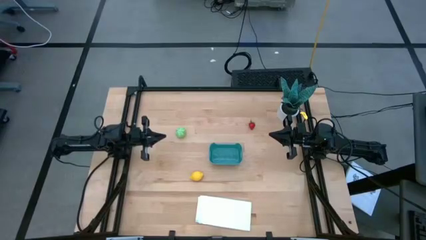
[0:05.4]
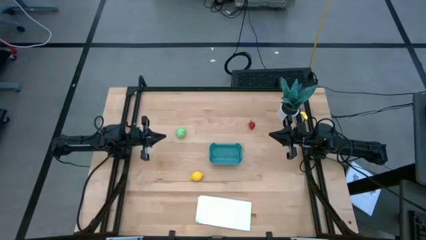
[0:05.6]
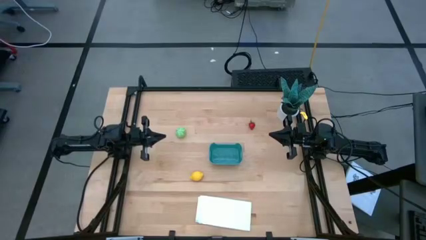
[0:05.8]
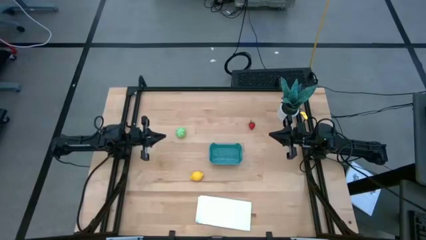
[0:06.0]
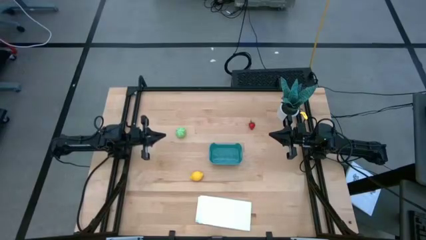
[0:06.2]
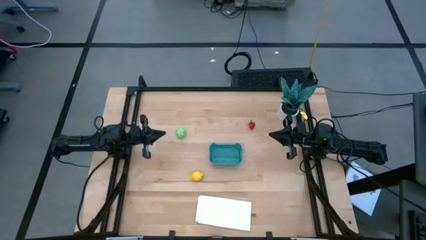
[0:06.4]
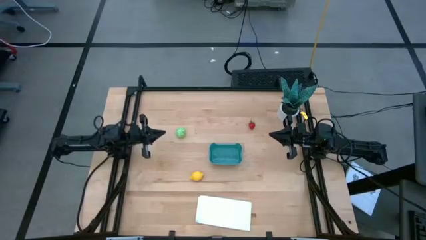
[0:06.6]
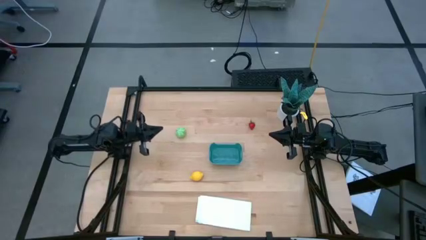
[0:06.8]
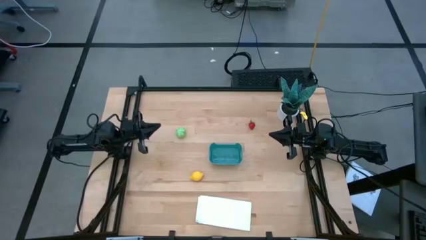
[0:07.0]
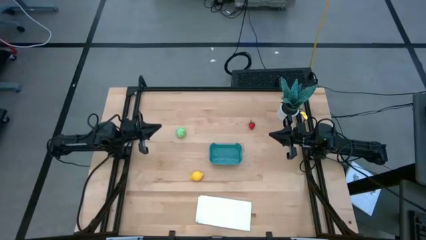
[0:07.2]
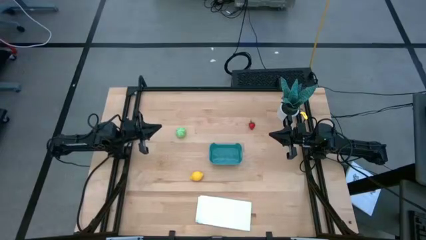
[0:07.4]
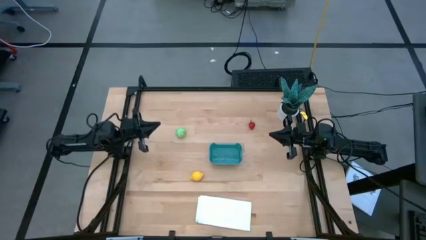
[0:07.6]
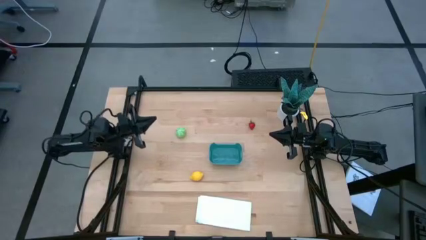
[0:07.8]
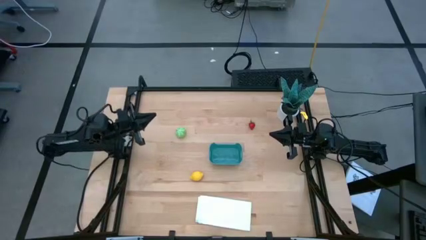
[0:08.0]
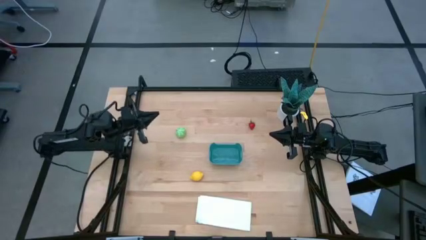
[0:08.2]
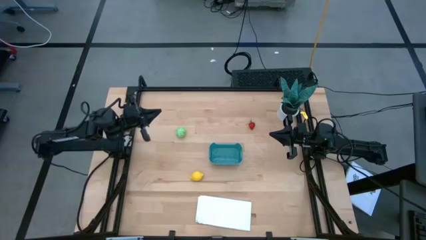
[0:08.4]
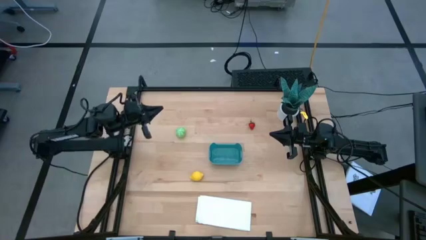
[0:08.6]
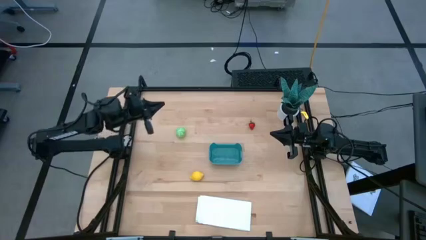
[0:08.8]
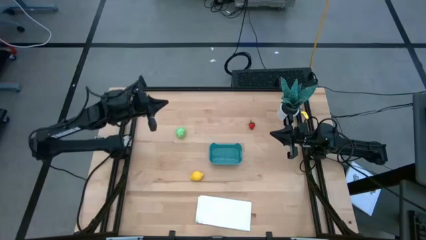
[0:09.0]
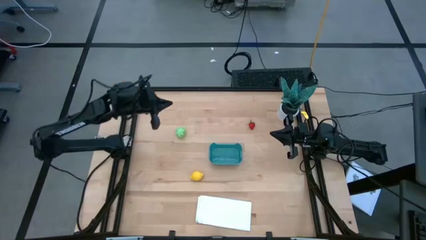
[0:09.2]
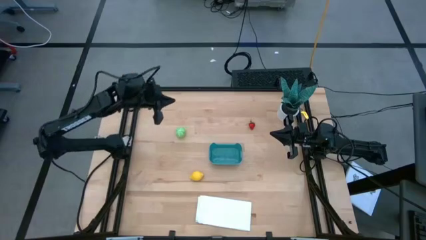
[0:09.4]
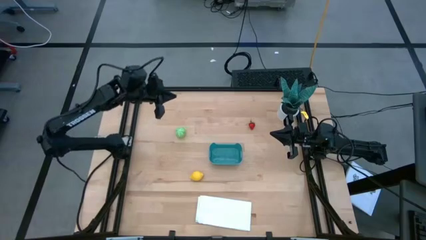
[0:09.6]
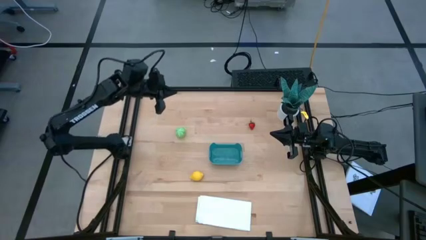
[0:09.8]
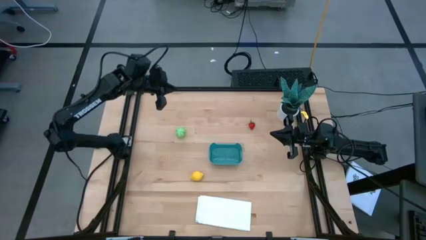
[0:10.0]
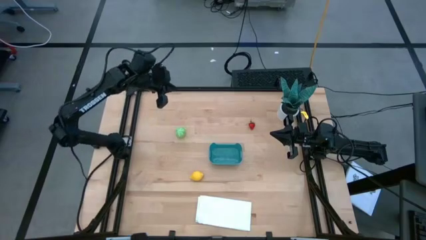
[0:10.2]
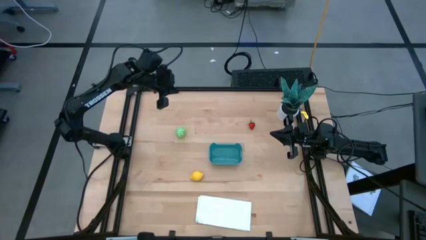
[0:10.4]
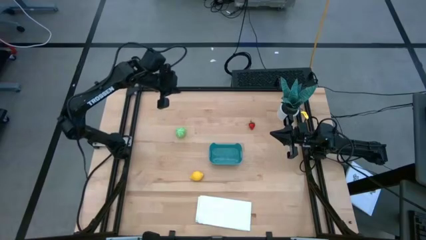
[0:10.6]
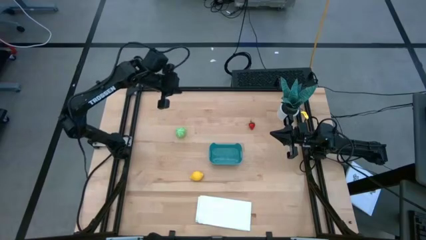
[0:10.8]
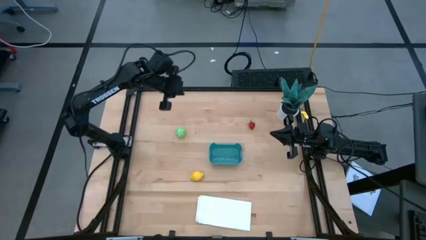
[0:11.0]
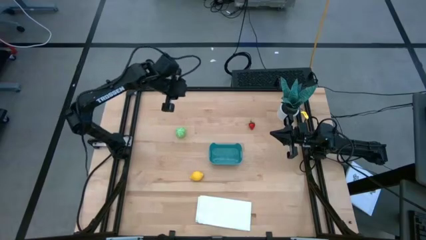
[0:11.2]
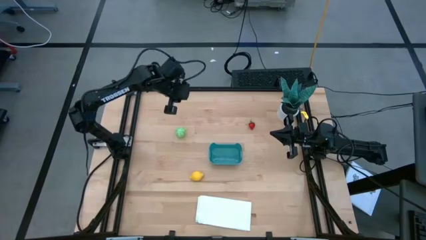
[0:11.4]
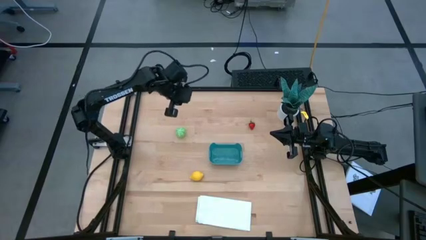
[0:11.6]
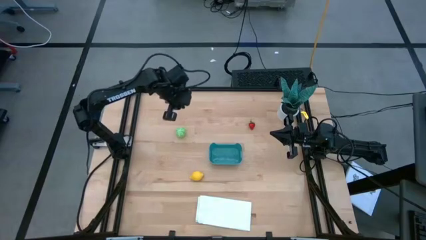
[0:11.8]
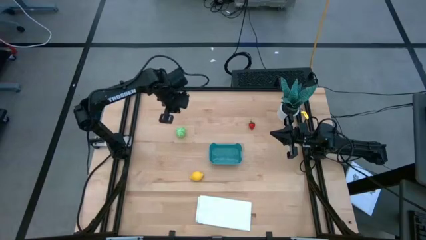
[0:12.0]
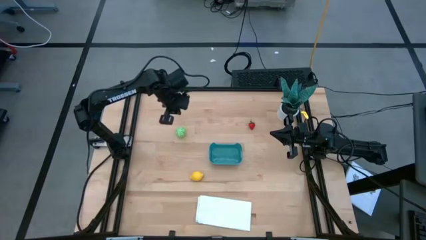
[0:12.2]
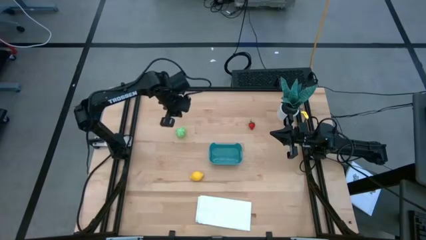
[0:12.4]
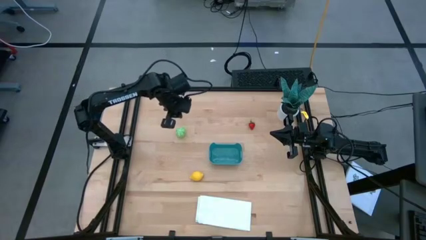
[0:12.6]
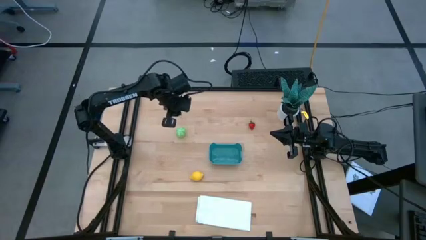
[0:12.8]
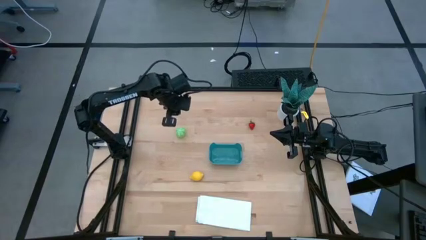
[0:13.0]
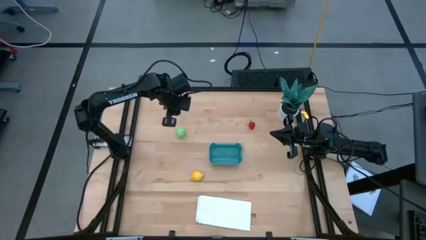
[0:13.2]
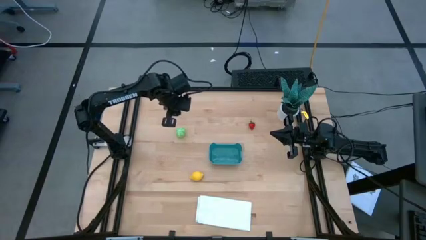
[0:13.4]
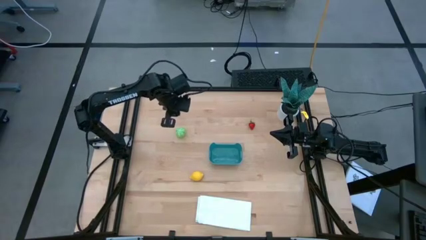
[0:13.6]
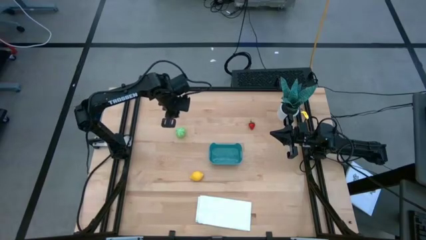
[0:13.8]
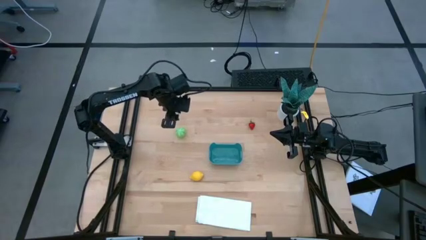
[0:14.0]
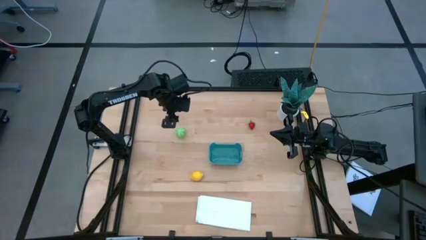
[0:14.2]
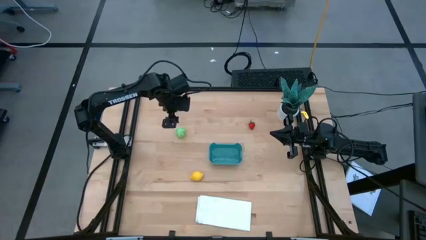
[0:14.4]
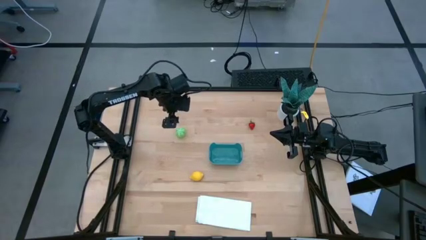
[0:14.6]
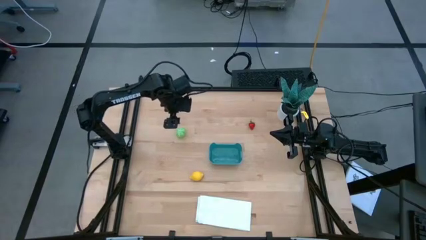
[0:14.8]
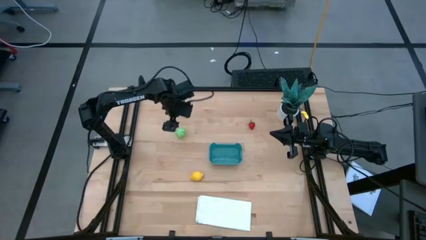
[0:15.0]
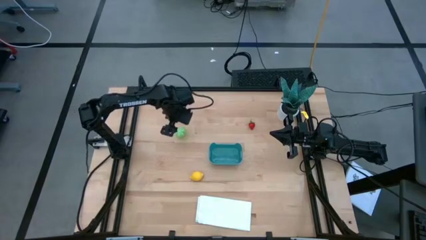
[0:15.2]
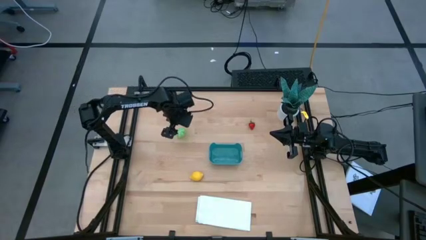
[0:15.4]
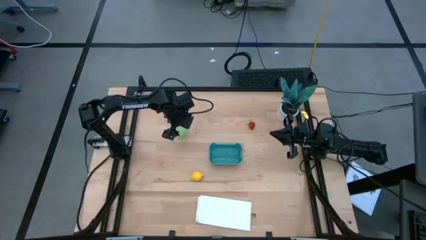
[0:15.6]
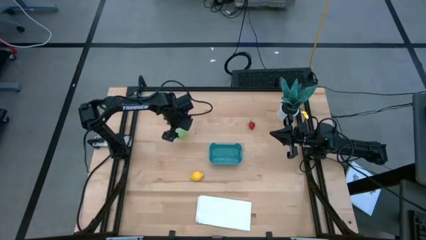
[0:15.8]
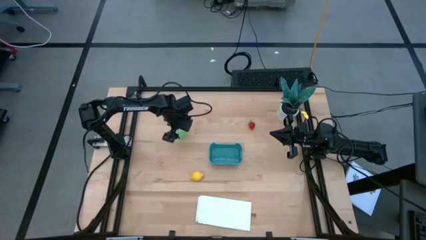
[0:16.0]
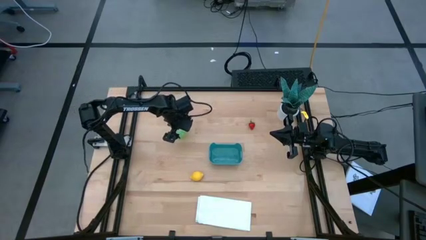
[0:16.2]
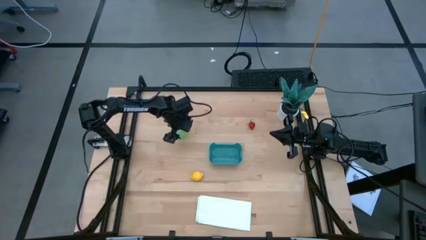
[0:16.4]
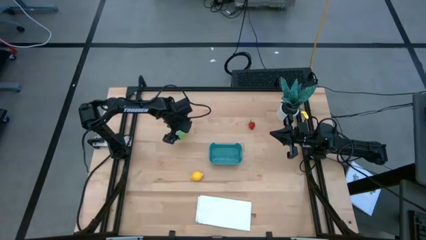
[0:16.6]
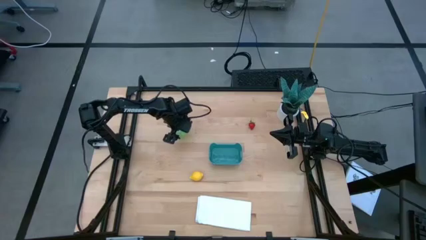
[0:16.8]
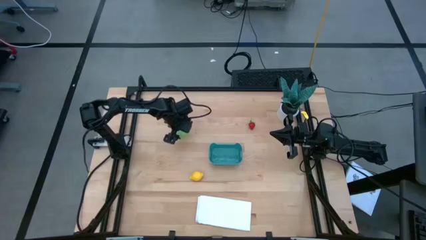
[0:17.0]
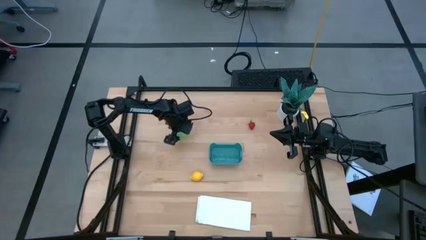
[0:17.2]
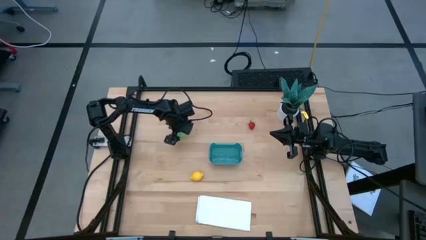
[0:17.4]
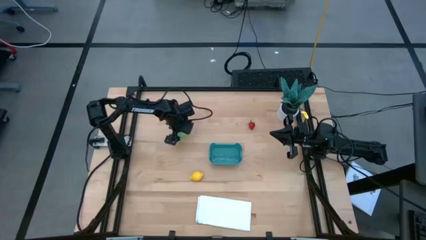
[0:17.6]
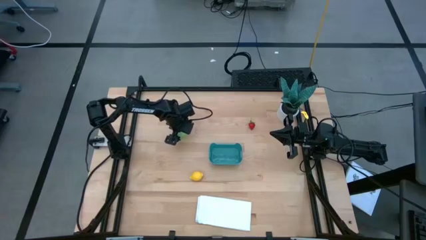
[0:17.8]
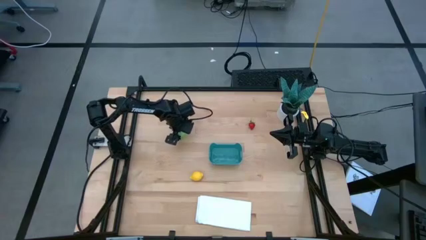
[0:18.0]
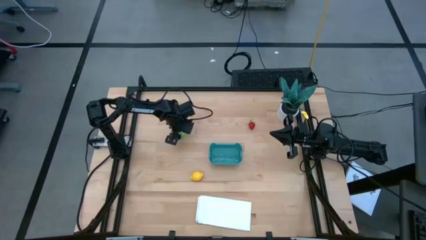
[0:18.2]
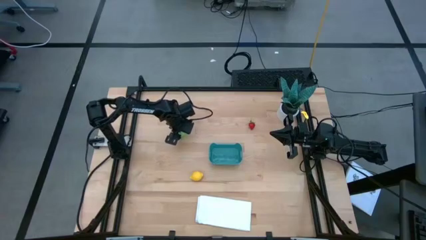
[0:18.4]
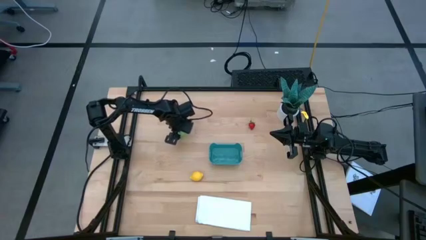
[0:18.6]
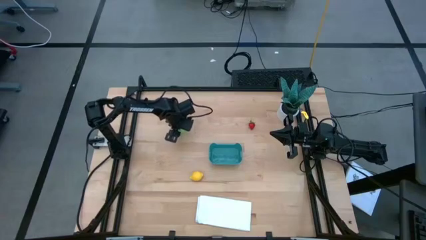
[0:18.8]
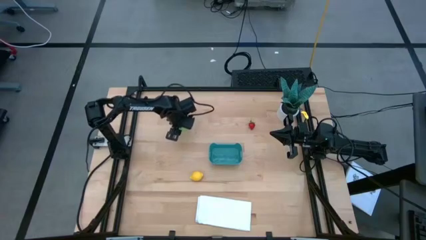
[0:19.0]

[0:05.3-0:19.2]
Task: Pick and placing Produce into tupperware
Put the green cabbage into the blue bin
